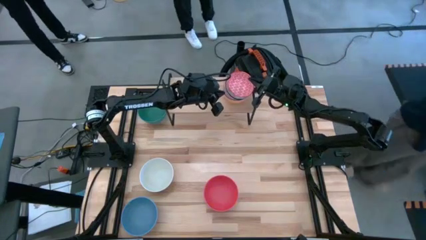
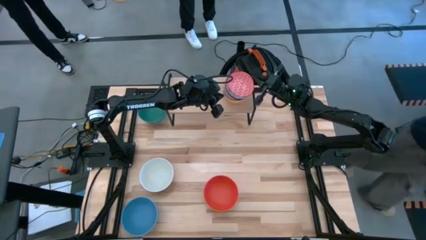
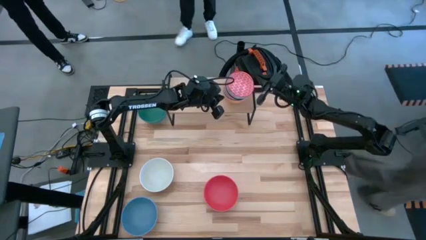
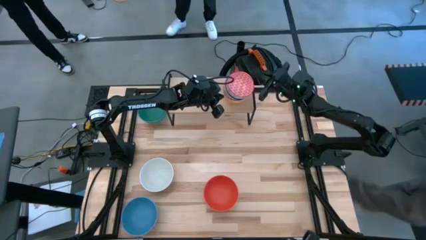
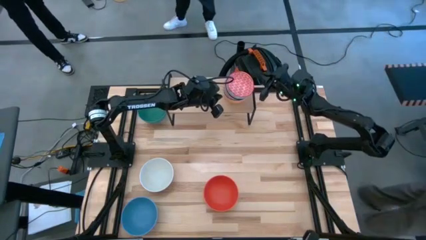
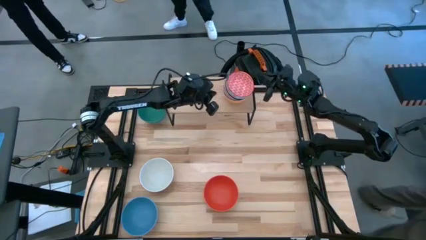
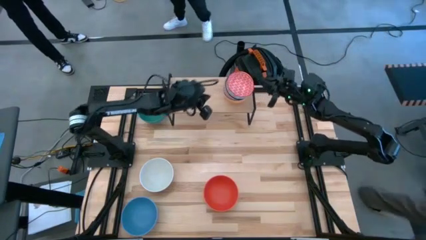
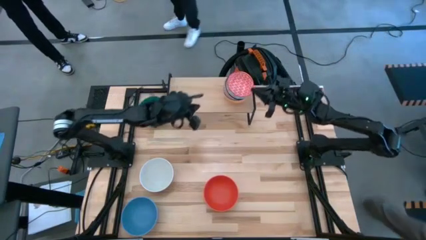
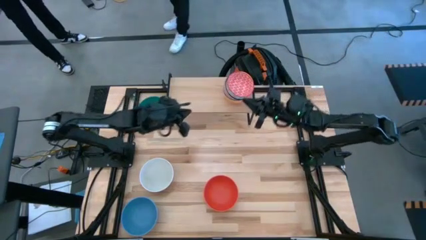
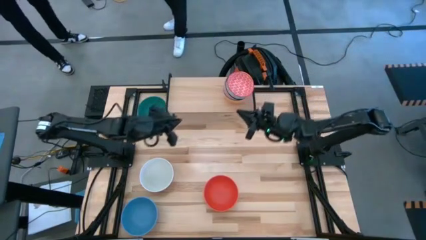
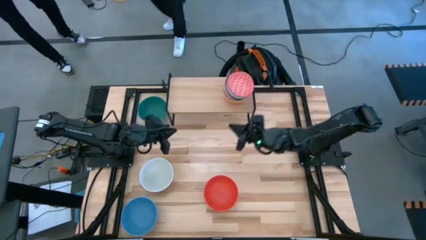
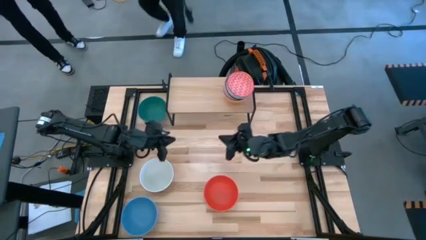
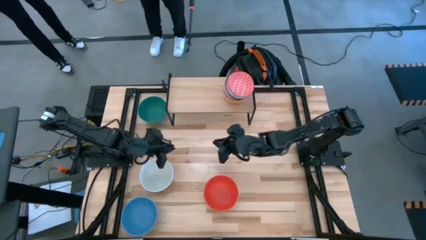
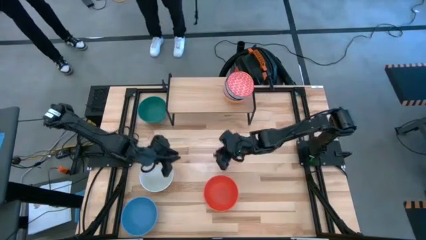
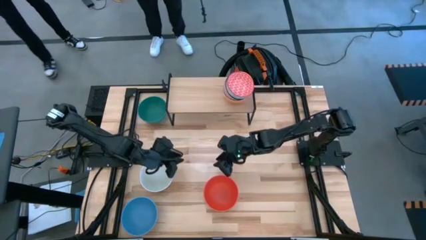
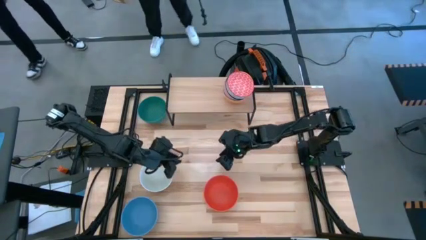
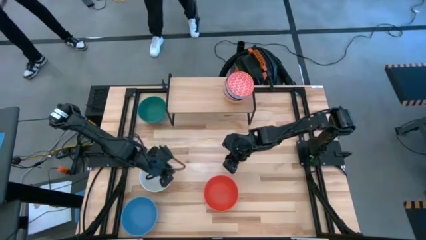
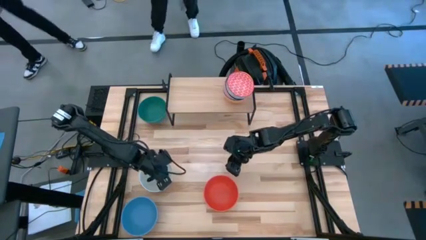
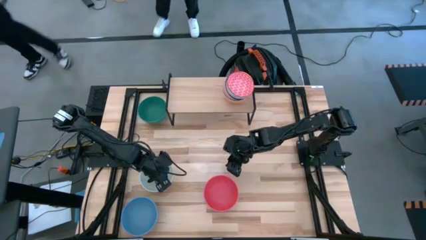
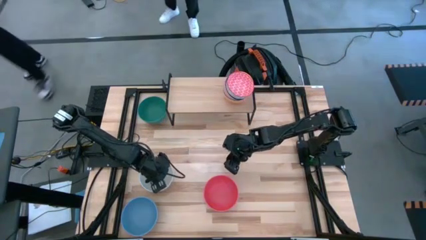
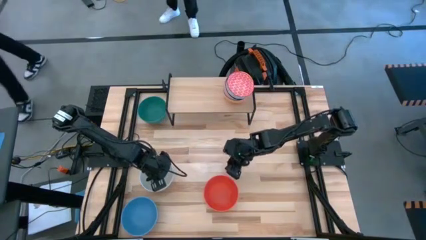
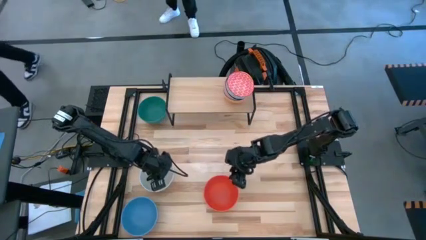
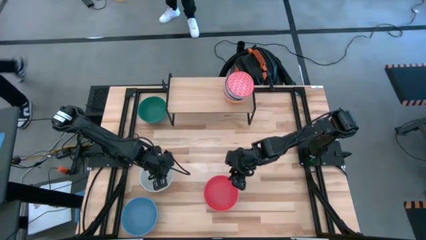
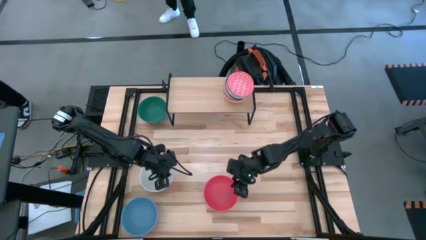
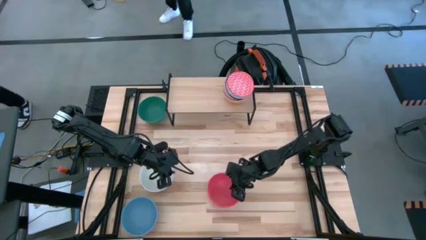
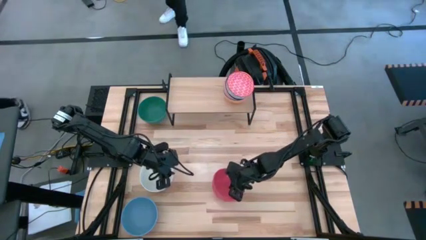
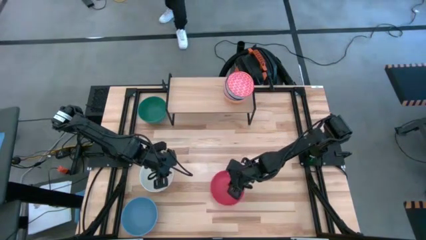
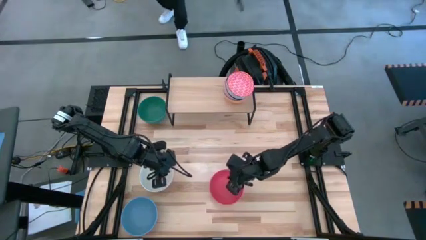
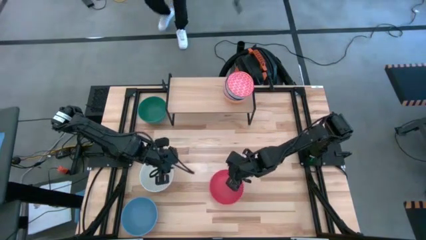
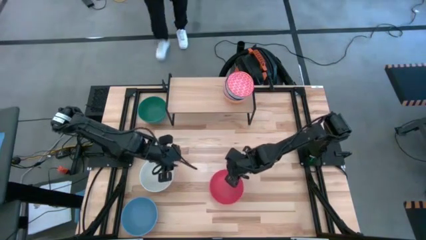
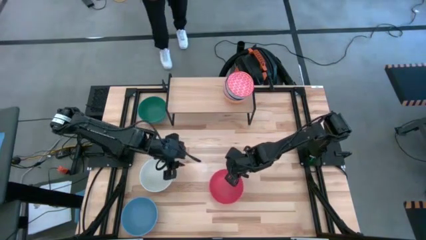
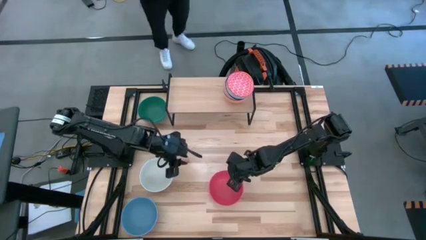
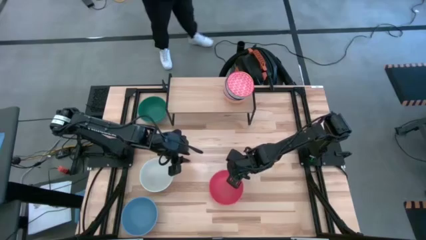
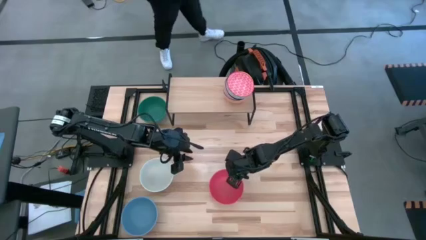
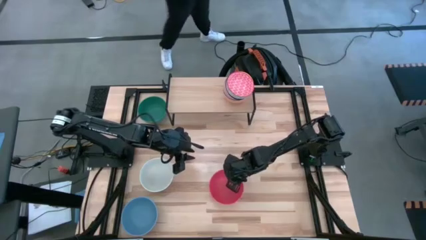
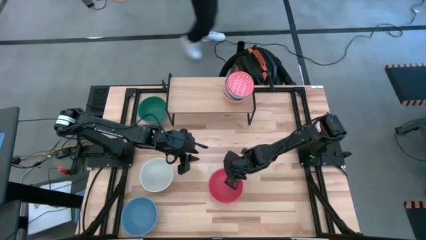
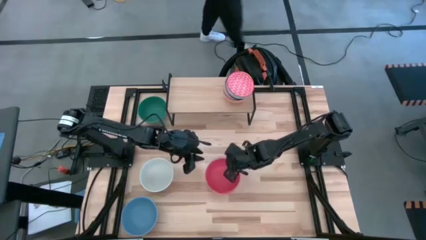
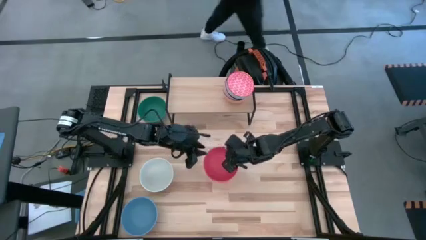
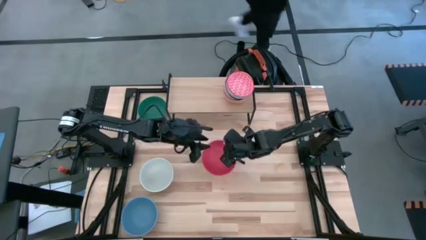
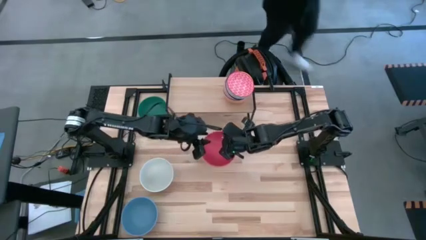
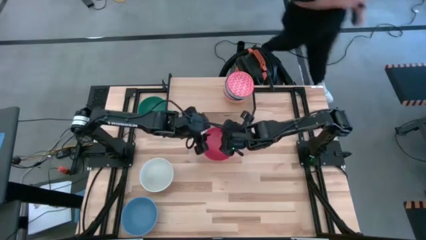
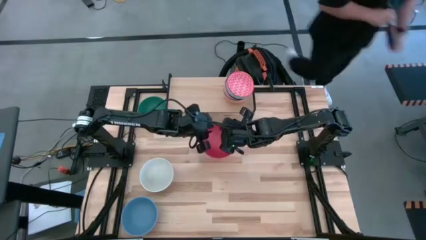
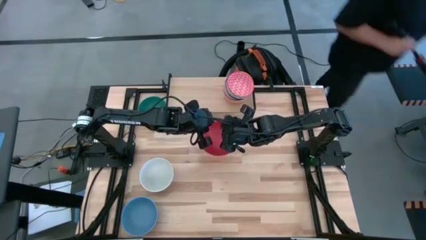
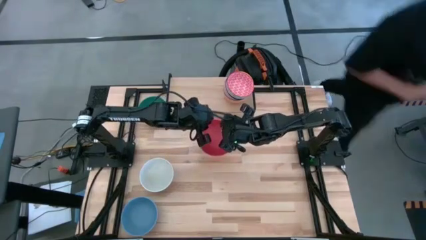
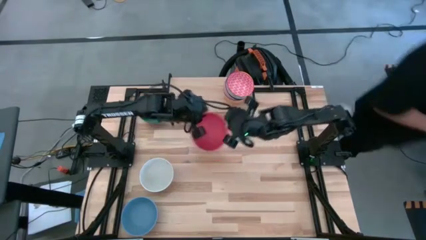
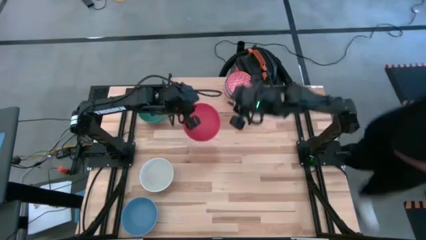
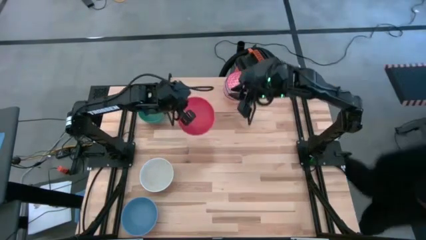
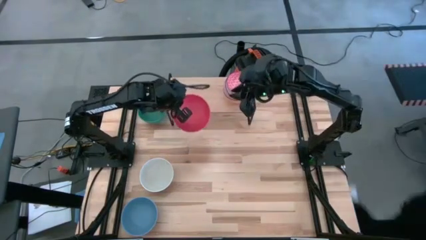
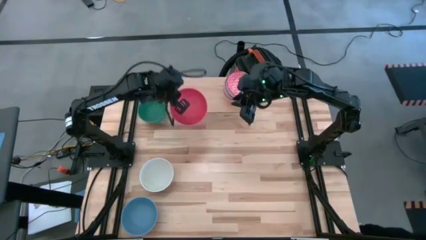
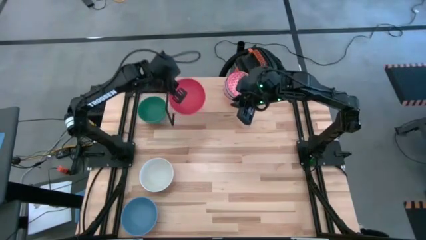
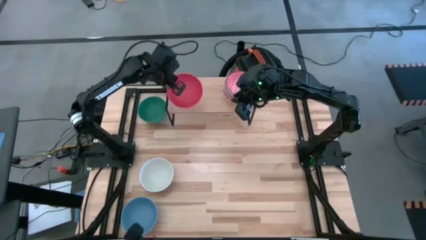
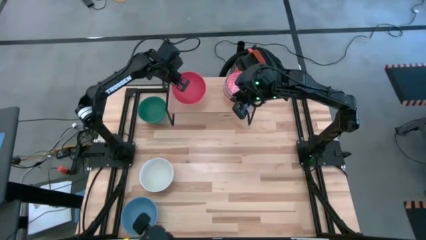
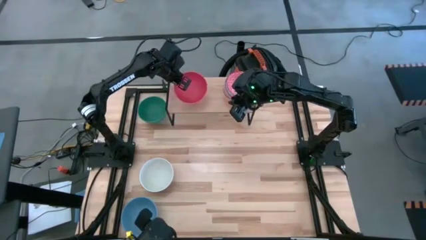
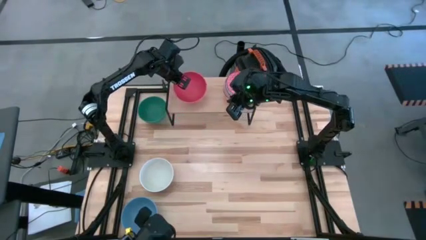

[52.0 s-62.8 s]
Task: Place and stack bowls onto a shelf
Put the orange bowl on the shelf

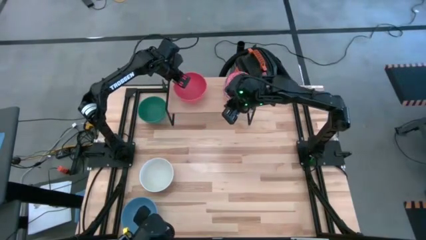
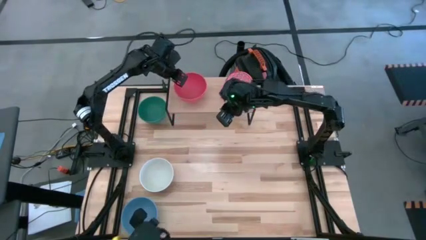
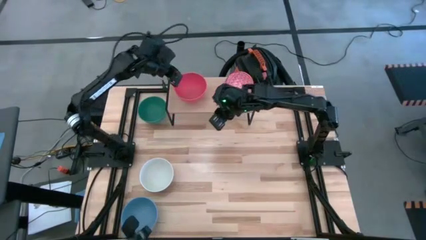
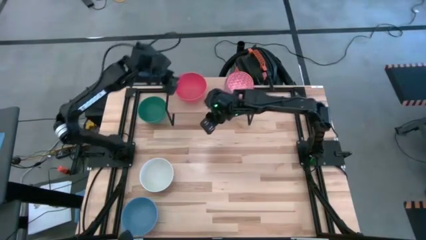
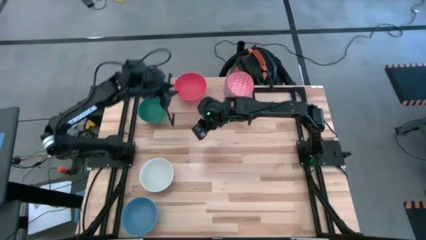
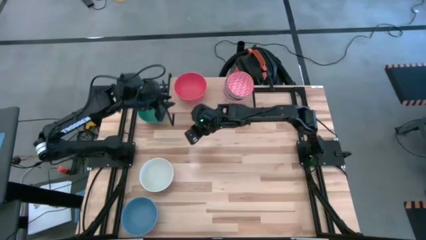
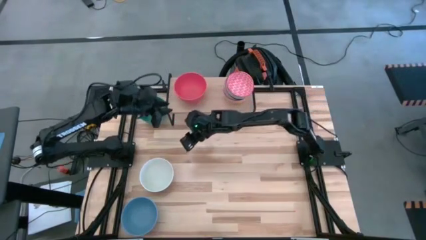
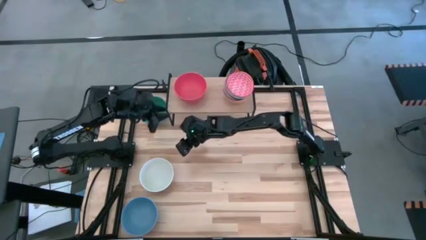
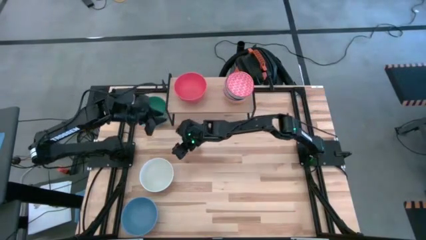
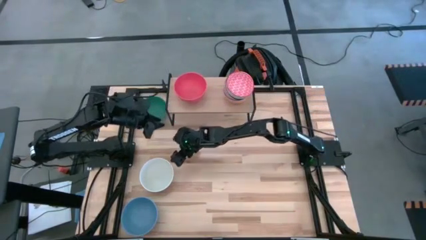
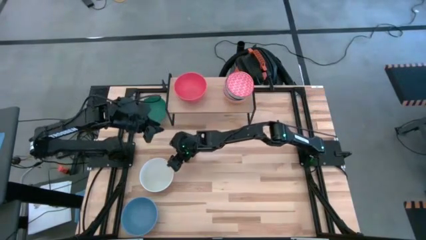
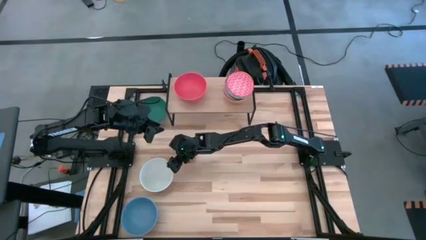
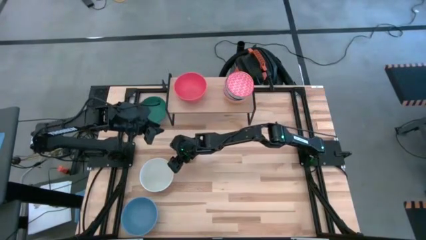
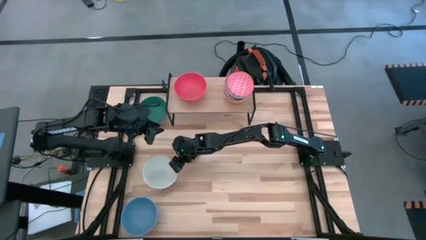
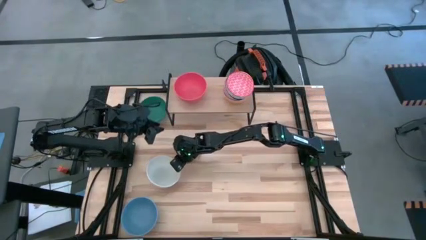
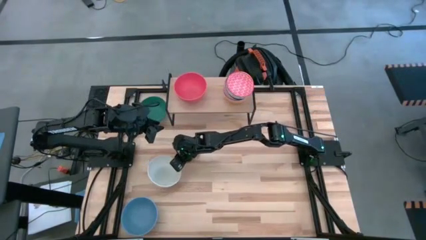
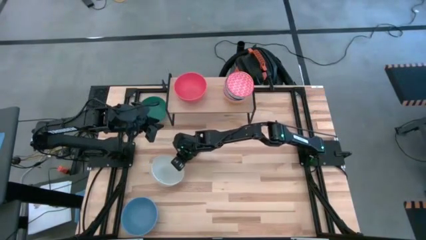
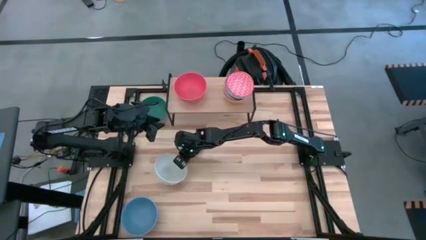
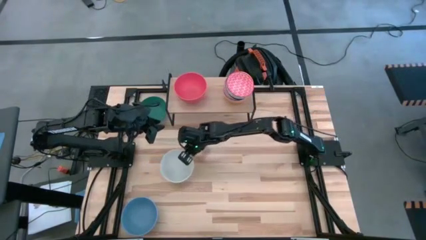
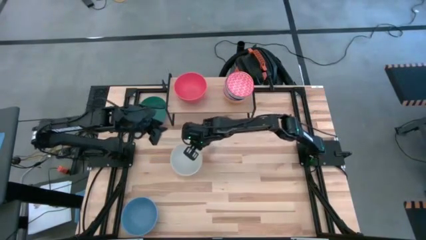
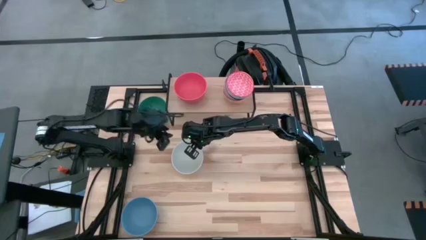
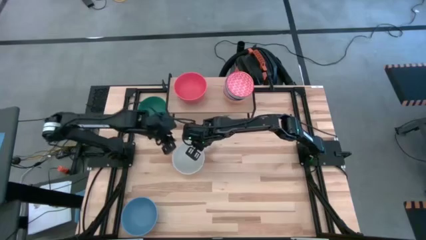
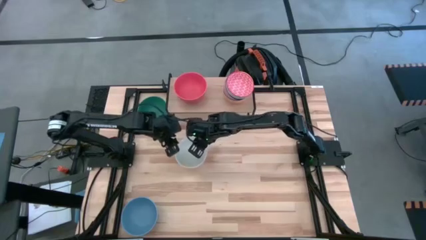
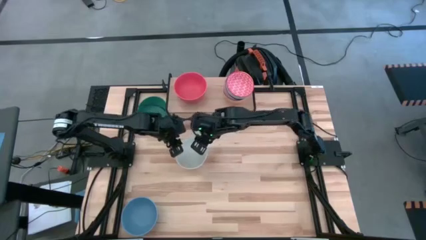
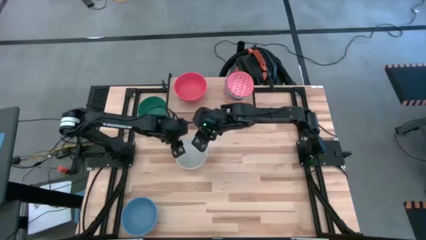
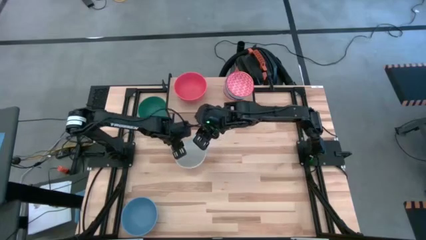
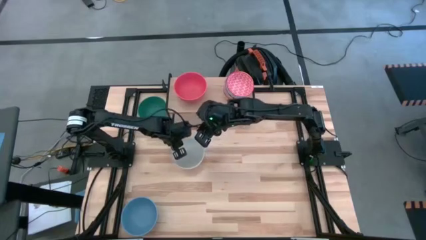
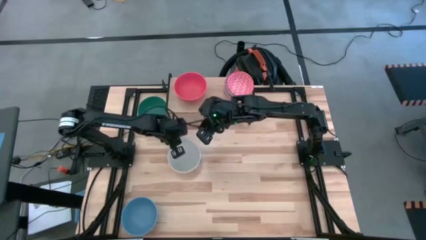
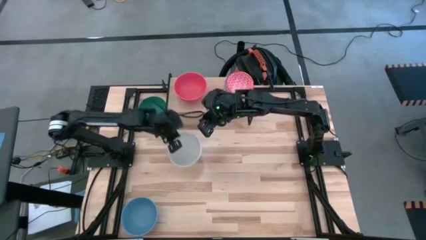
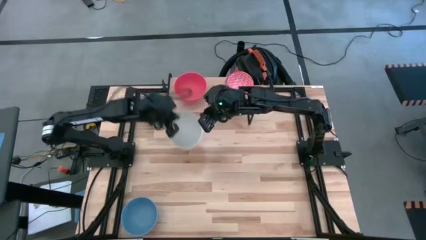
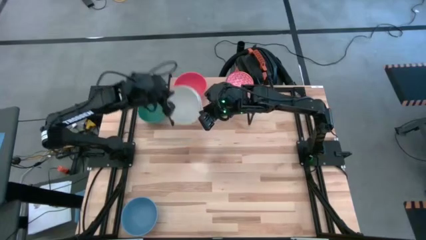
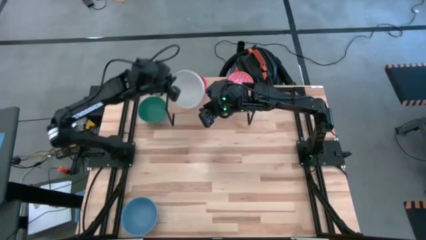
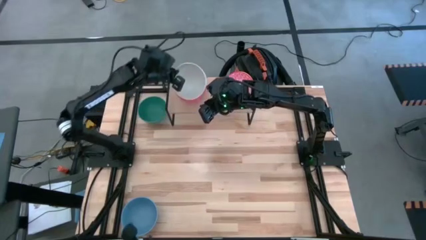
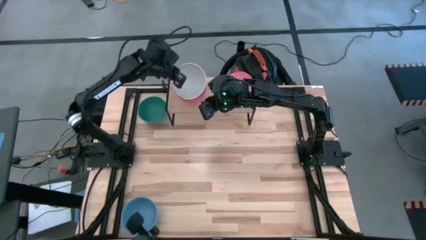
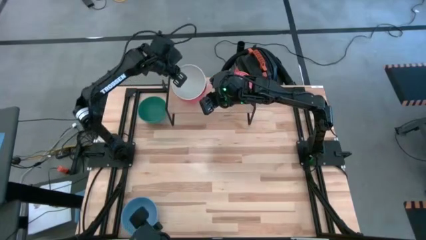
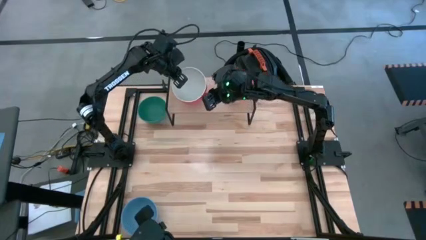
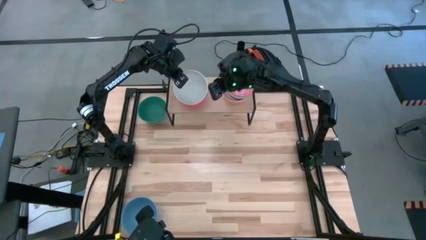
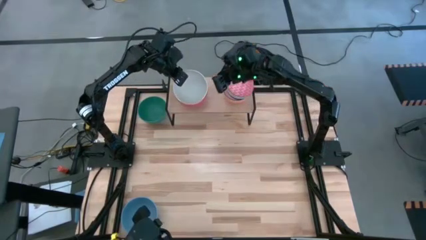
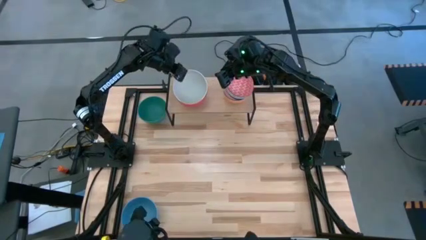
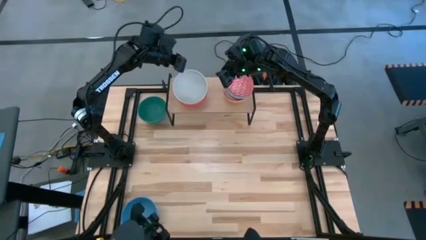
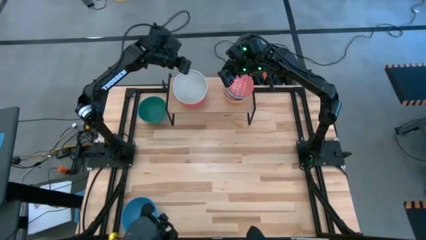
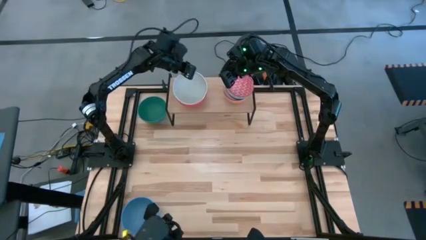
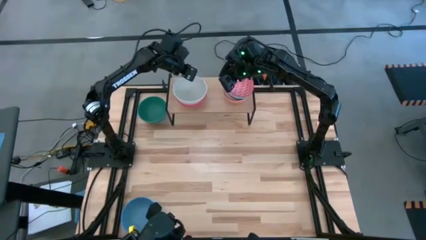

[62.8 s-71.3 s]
Stack the white bowl on top of the orange bowl on the shelf
